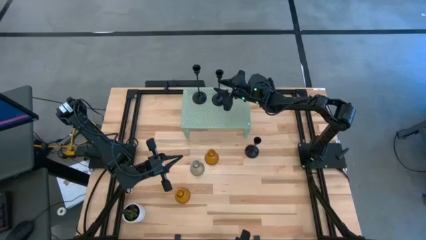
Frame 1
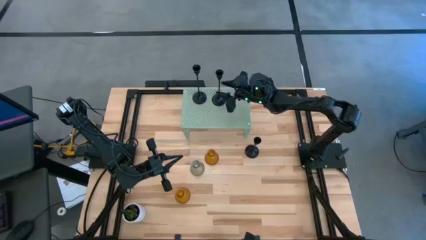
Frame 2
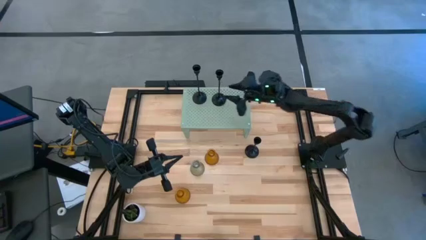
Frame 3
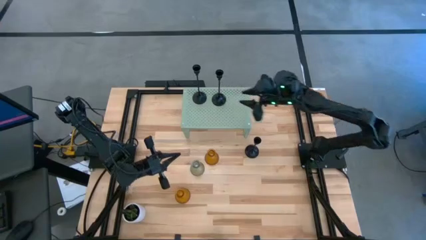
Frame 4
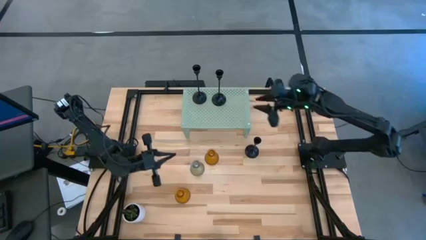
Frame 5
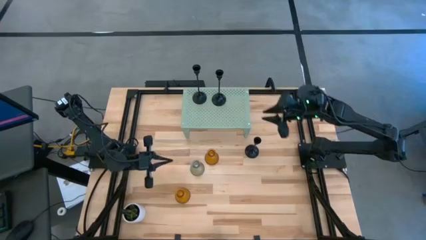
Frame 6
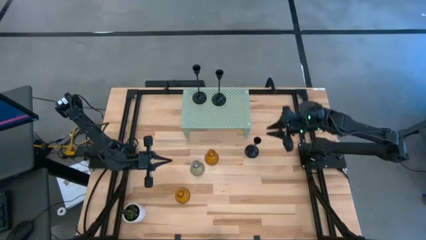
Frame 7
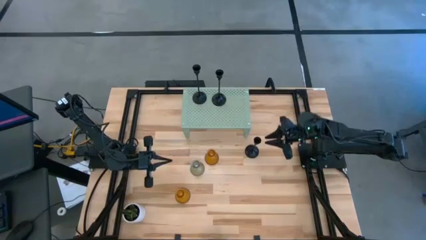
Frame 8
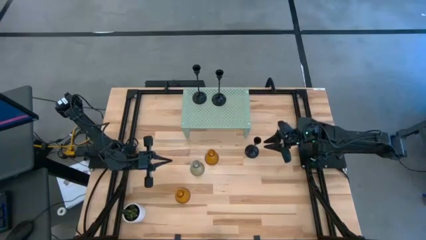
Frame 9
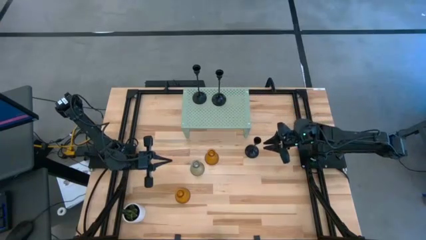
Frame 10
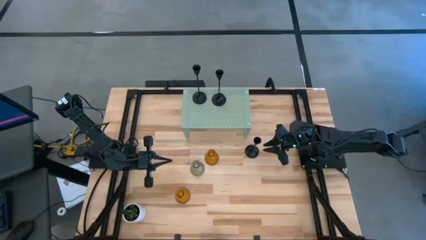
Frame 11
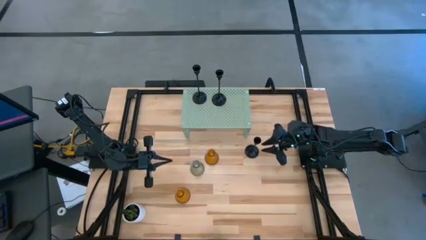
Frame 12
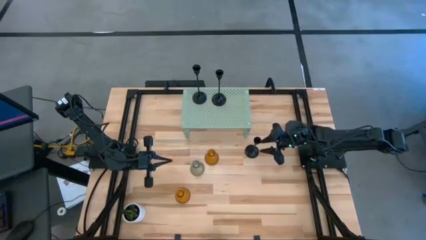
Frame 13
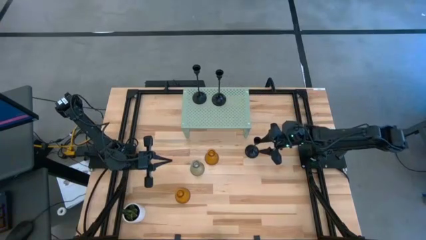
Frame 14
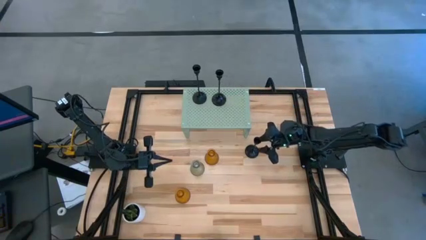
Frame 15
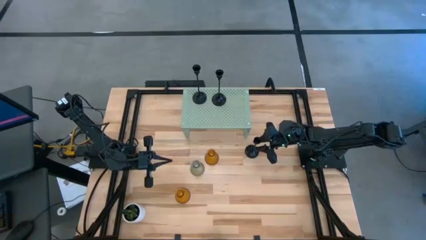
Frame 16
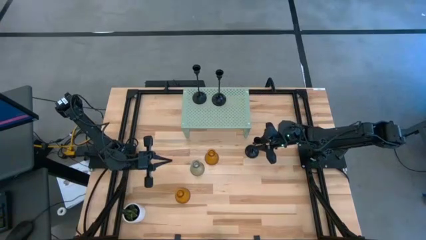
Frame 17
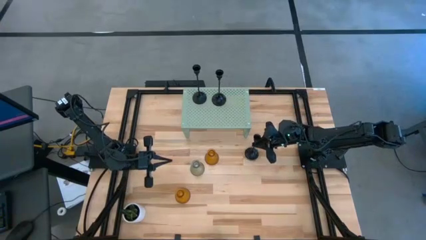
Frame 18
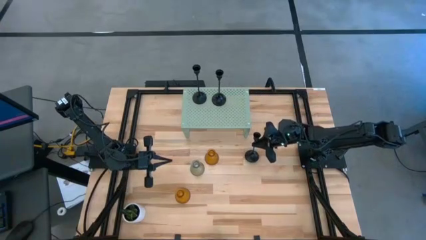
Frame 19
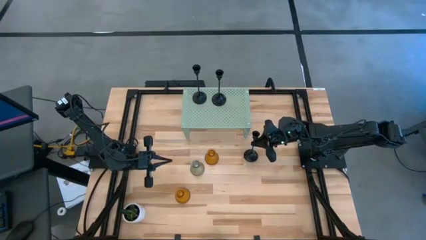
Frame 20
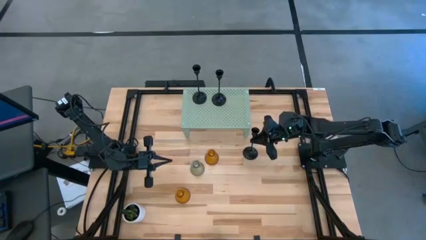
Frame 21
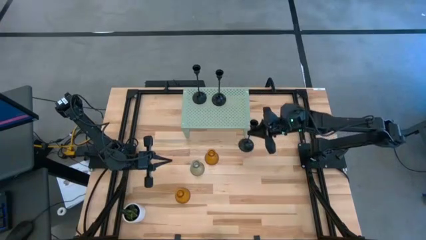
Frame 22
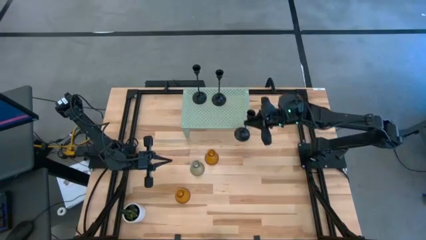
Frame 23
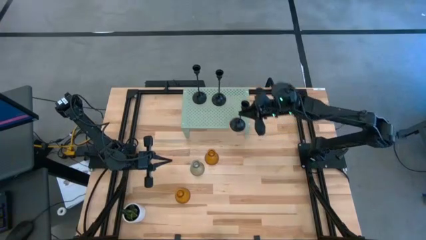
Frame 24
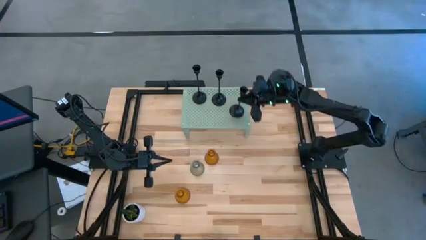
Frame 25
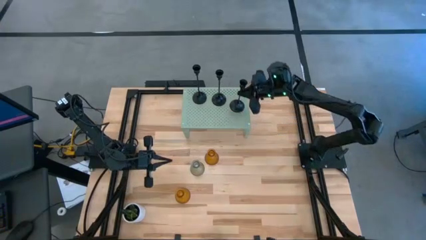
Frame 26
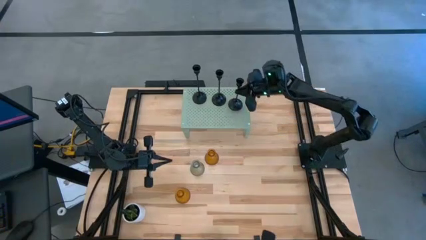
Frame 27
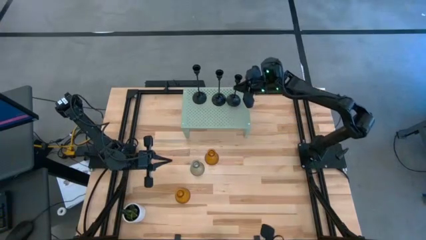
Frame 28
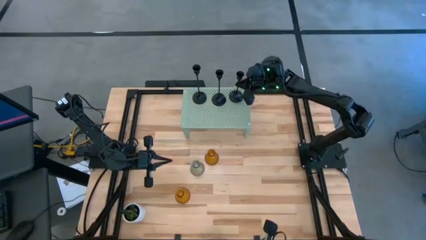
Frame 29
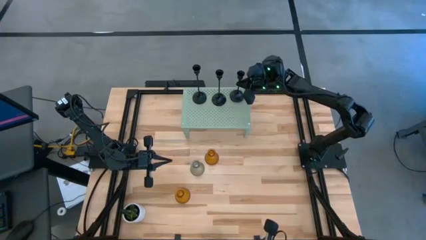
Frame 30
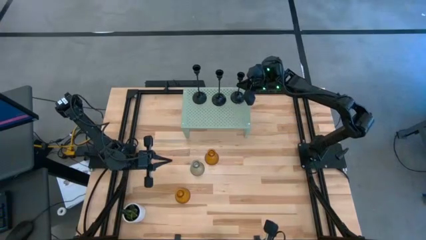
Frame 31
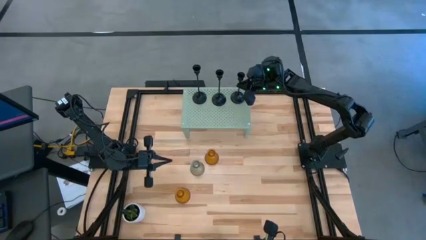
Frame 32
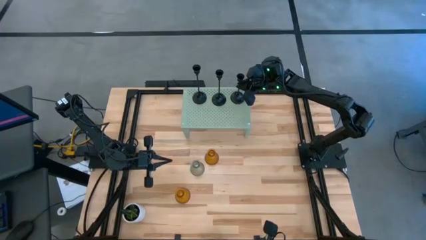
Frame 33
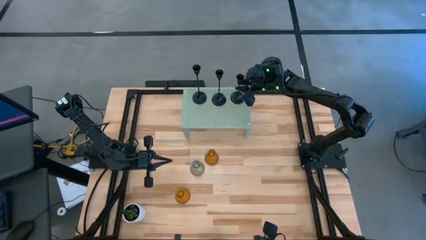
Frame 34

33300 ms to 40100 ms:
Task: Pick & Place candle stick holders
Put the black candle holder on the shelf aligned with the other black holder

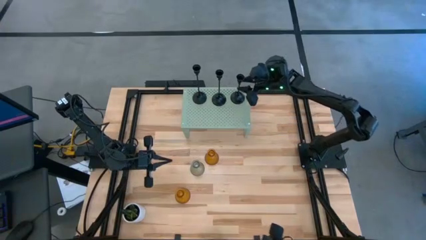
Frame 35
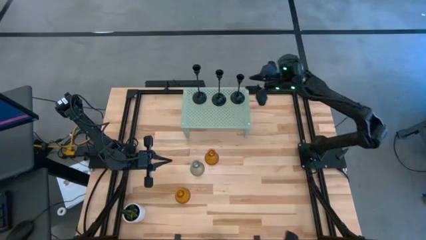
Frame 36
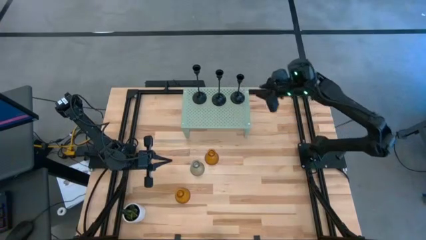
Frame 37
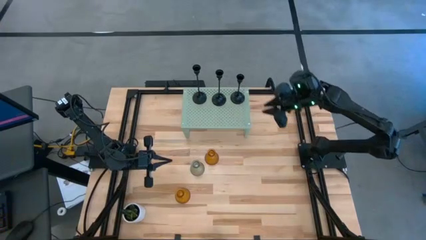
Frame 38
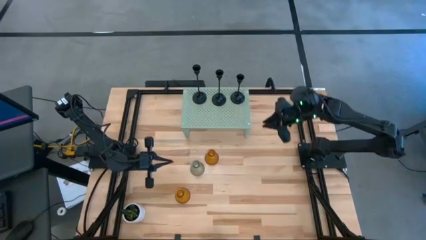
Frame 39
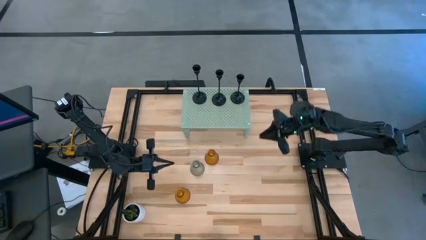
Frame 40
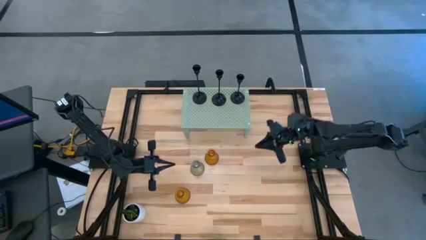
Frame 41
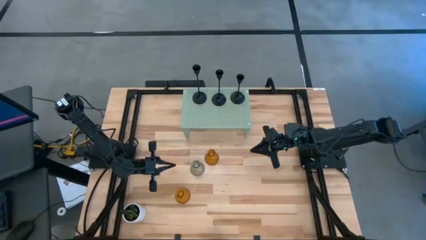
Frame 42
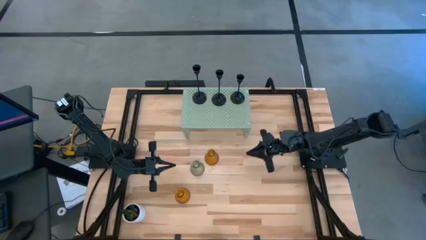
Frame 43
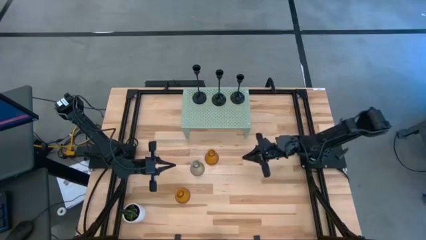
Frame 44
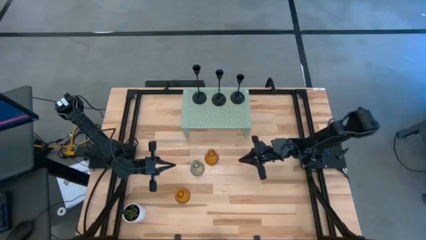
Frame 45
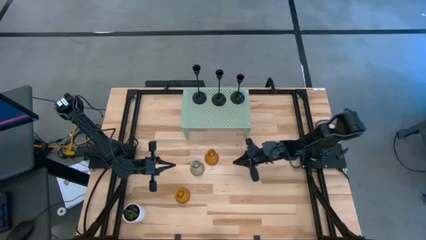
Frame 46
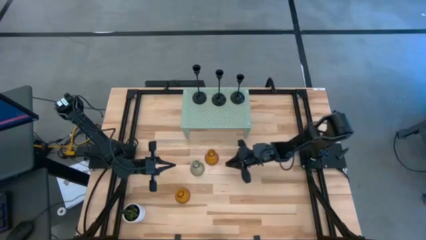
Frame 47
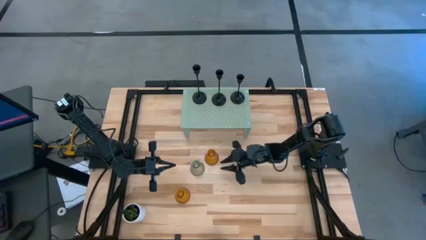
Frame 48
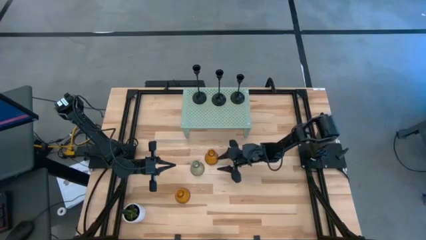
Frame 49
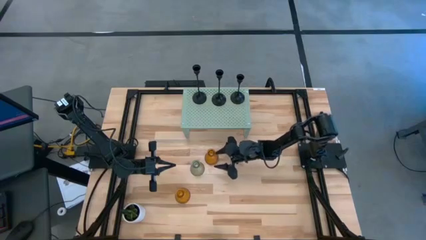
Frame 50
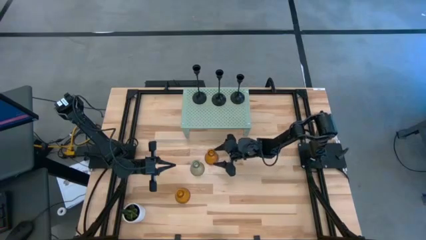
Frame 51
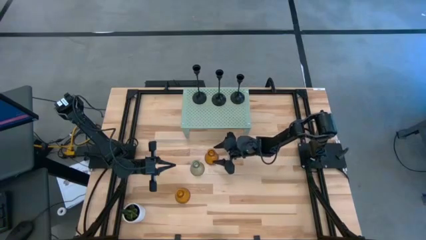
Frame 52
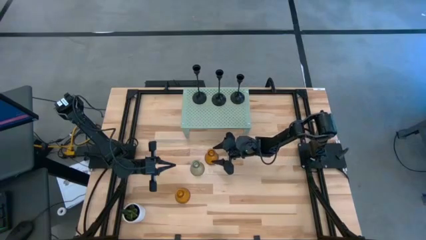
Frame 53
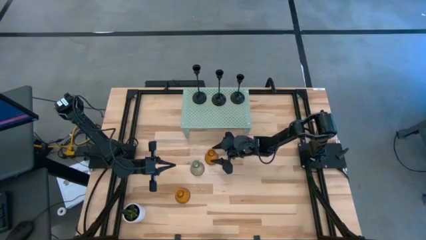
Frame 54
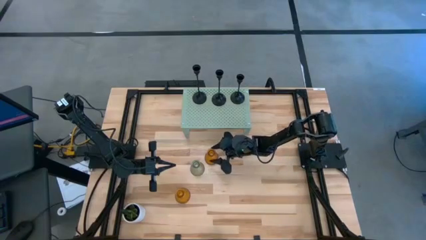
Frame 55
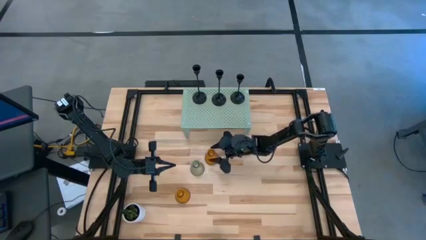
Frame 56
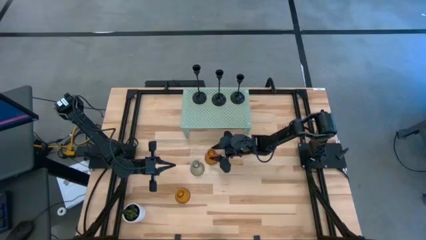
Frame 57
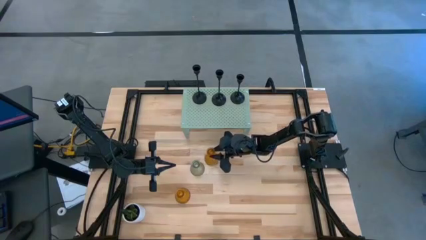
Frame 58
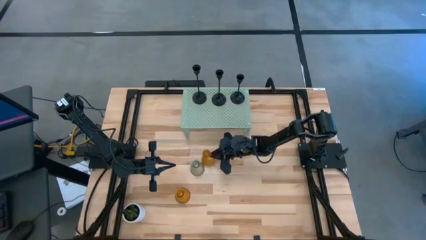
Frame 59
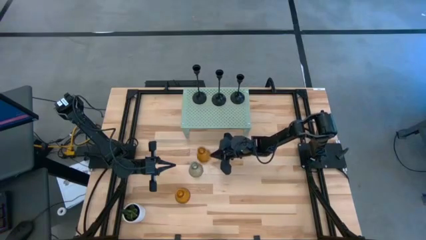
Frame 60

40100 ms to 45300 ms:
Put the top brown candle holder on the shelf

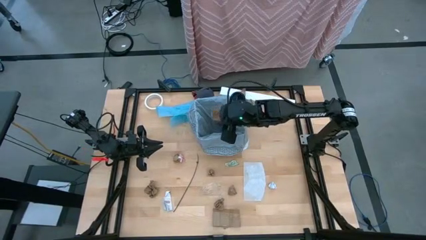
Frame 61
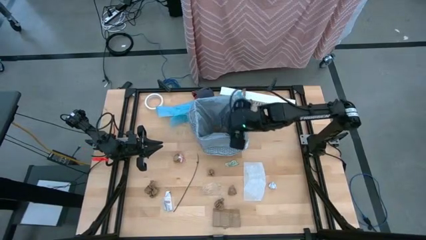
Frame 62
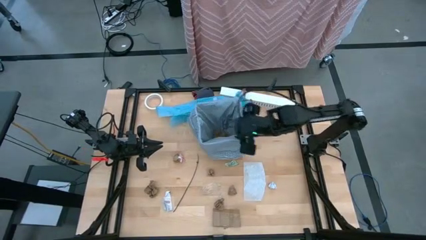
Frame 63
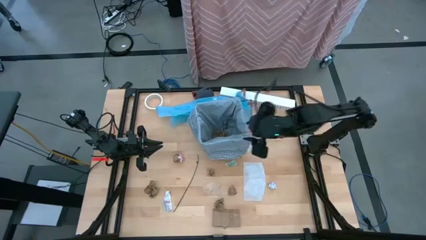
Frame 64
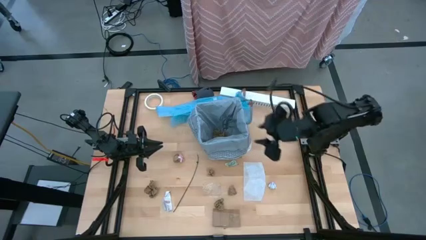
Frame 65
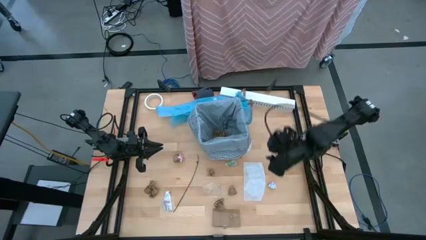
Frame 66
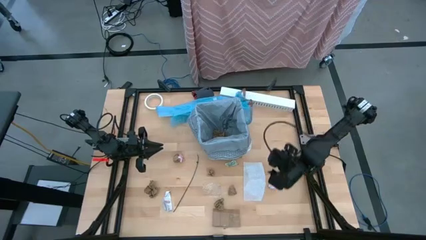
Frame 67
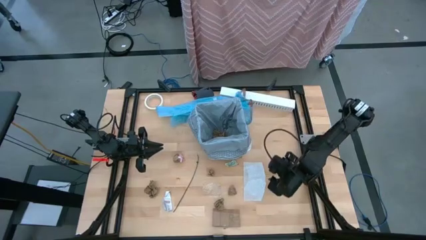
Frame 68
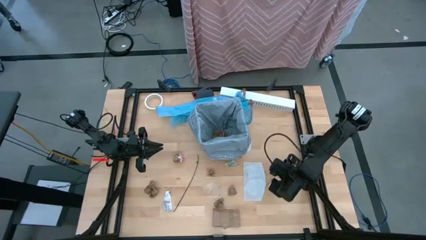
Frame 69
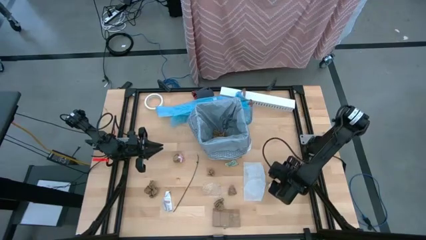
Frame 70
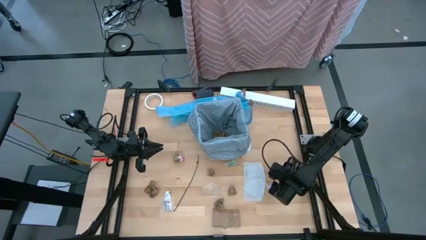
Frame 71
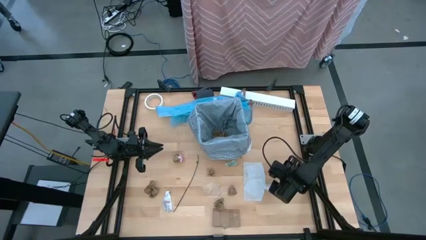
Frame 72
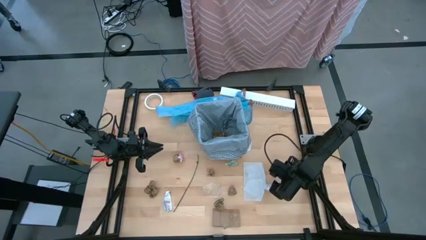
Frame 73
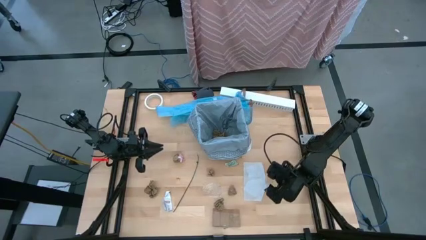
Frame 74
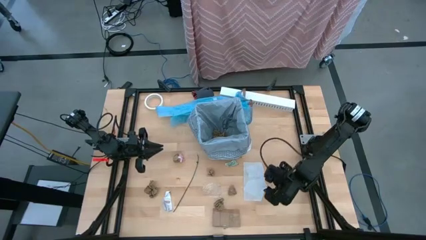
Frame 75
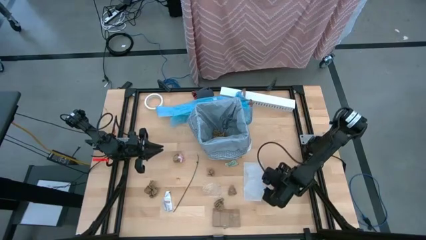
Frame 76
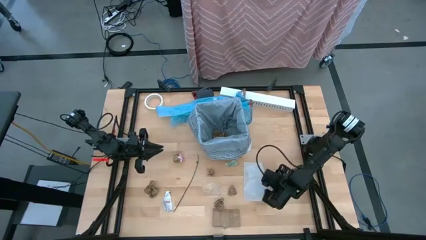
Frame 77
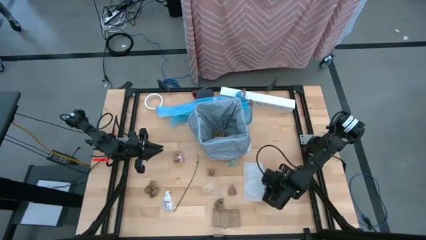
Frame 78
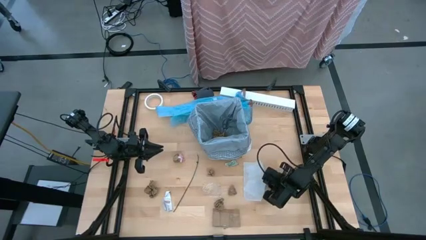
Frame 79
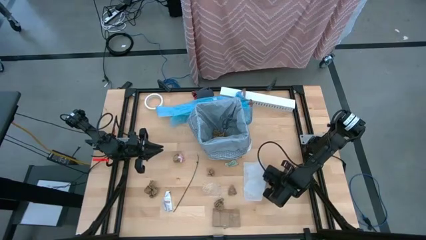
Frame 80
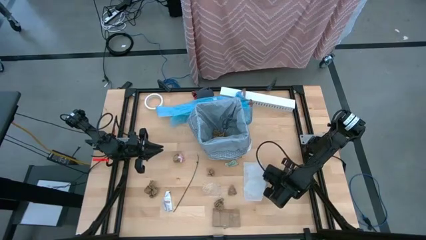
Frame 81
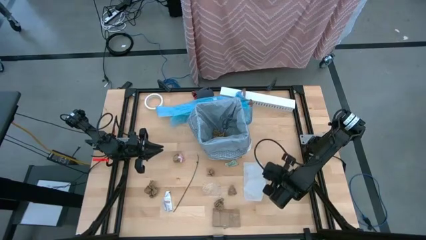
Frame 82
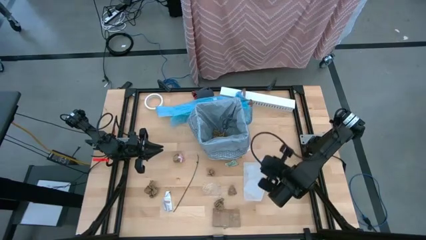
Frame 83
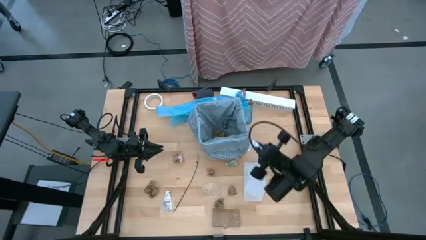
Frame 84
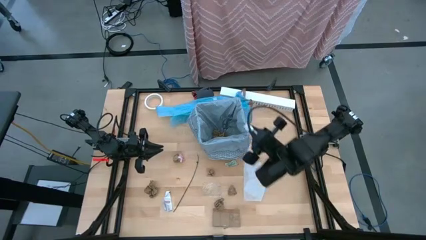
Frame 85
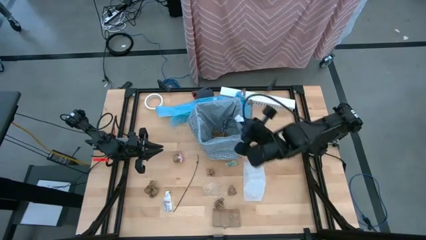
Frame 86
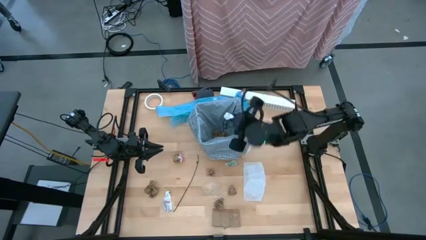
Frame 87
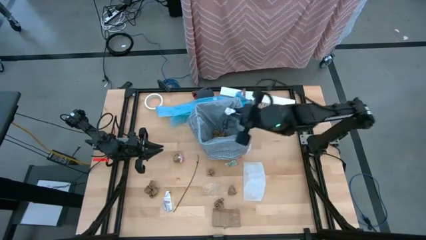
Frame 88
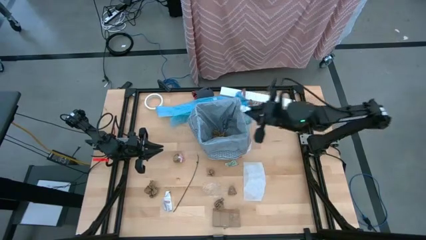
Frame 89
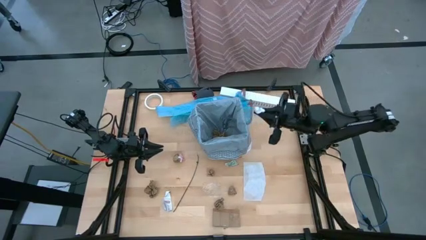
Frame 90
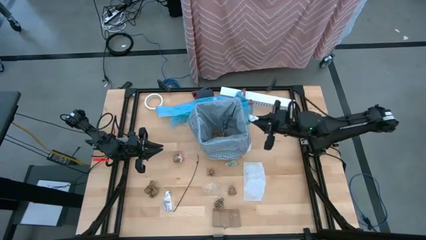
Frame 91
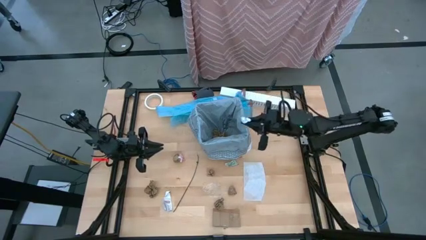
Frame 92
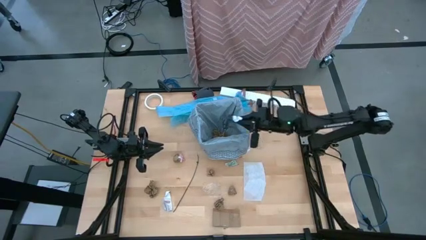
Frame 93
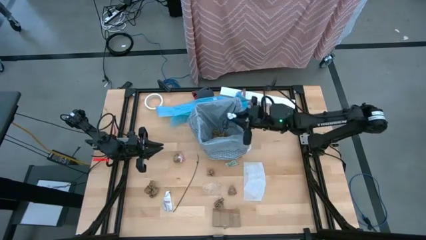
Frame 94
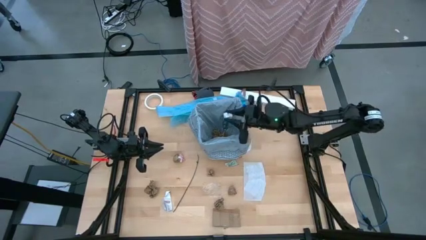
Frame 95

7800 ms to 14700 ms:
Task: place trash/remove bag and relplace
Put the white paper inside the black trash bin
